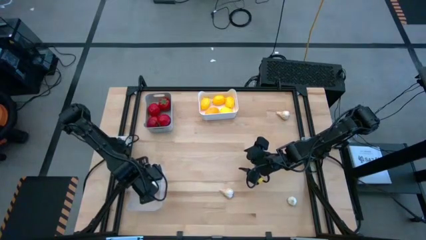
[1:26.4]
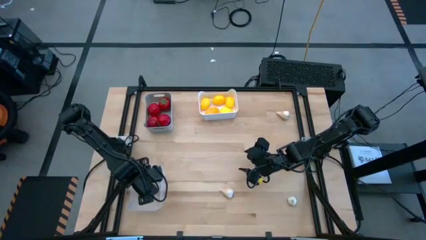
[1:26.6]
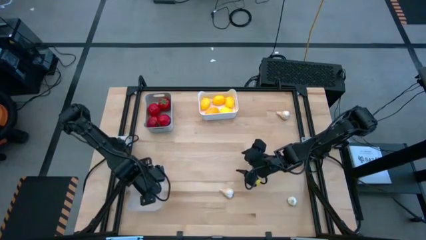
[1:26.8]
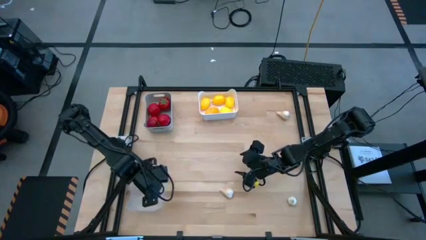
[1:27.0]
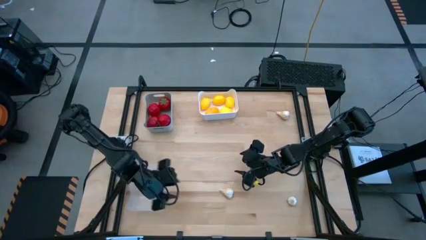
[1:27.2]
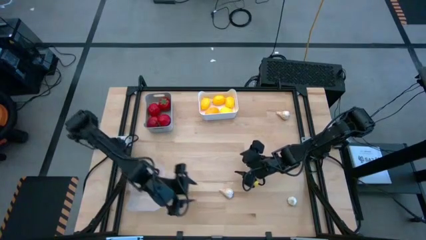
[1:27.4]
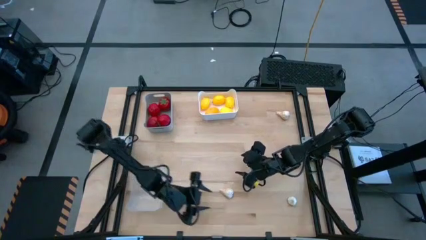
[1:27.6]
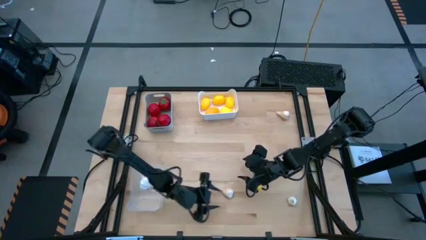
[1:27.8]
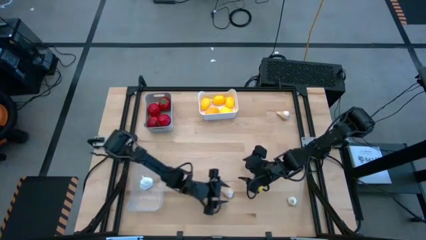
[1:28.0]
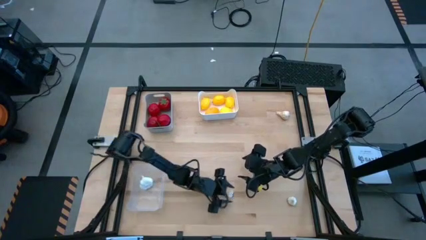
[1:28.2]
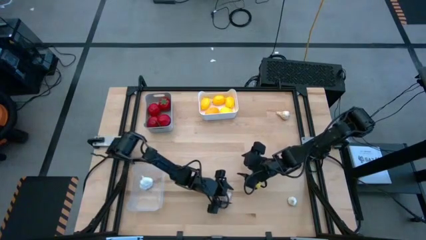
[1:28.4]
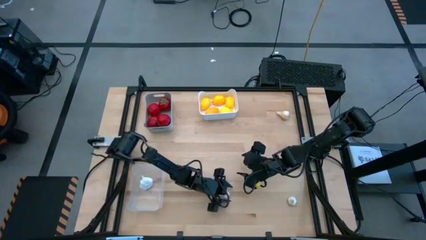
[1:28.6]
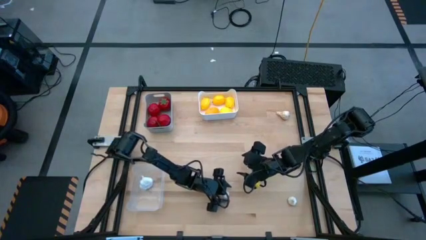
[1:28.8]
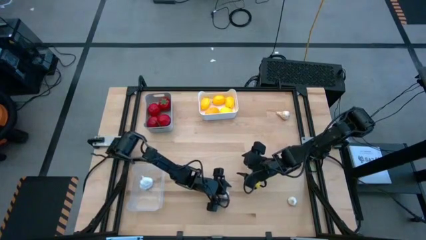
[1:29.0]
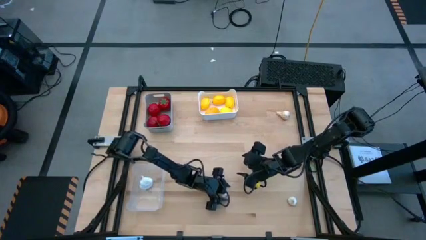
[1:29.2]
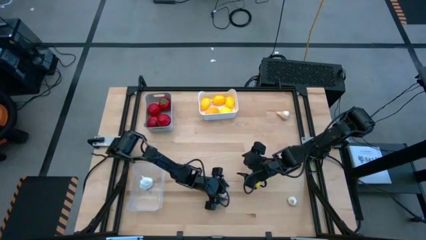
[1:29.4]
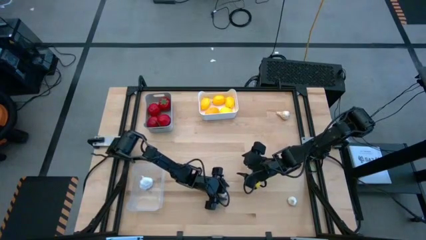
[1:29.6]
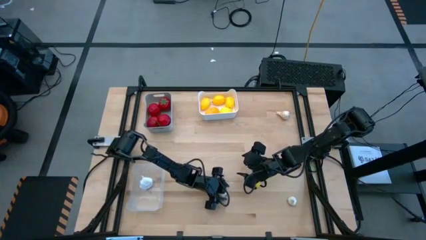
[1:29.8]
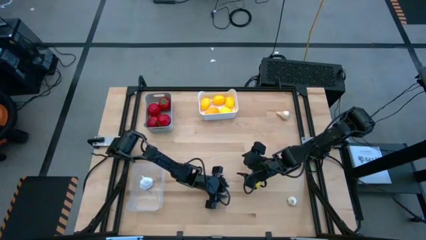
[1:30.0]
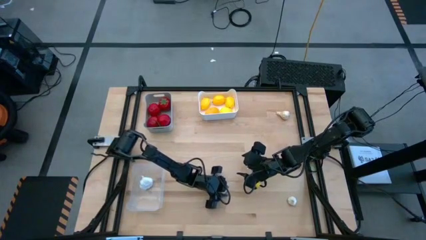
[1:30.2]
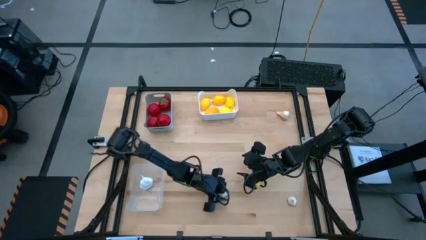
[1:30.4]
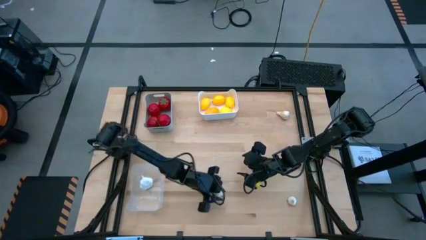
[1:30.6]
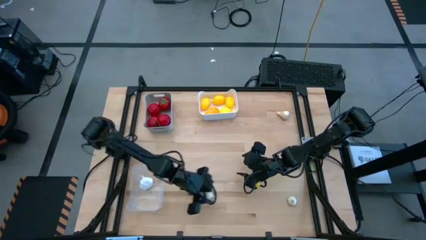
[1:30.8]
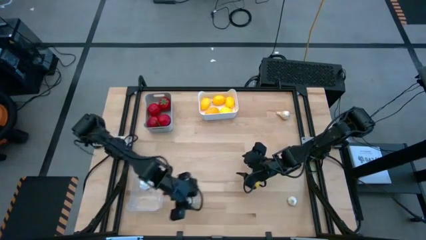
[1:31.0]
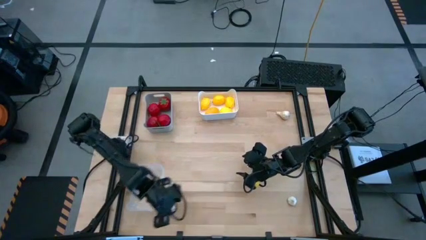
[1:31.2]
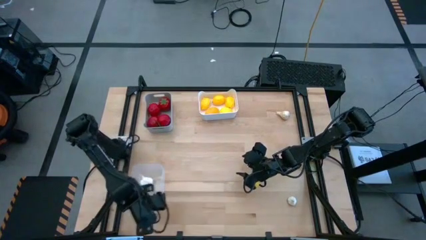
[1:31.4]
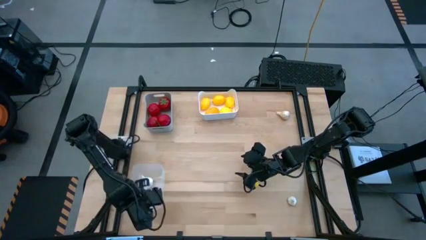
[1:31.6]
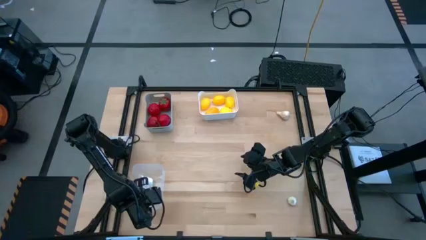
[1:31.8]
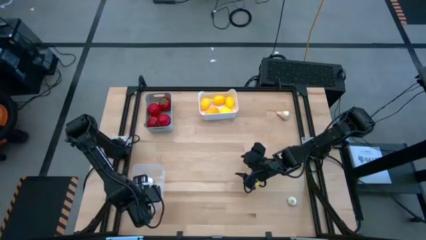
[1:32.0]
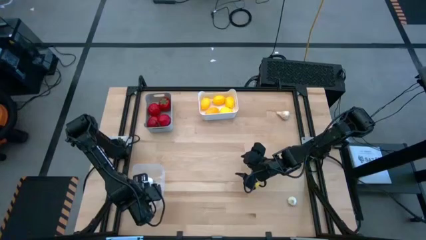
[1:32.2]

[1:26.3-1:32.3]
Task: Sort produce into baskets
Put the garlic into the transparent bin

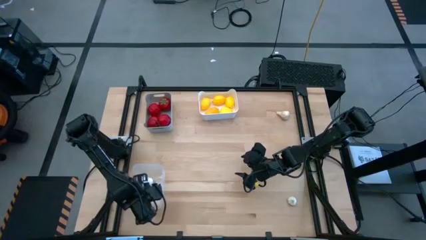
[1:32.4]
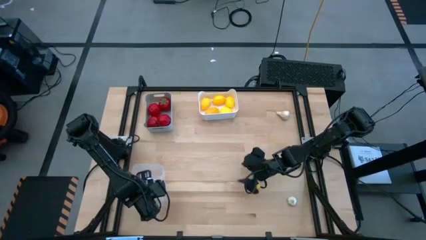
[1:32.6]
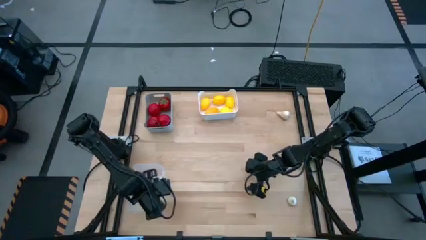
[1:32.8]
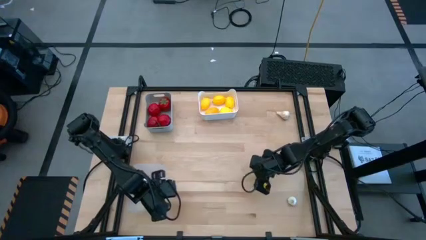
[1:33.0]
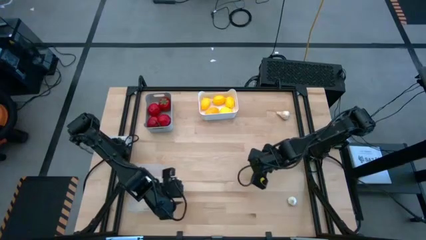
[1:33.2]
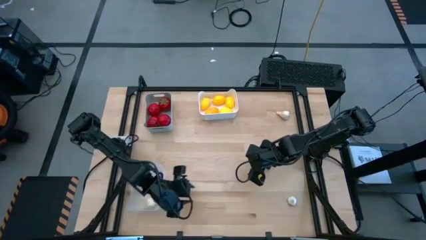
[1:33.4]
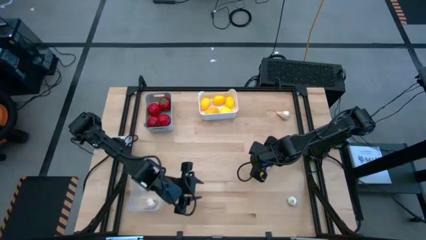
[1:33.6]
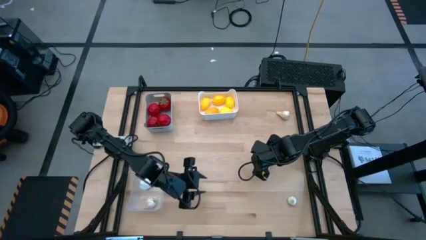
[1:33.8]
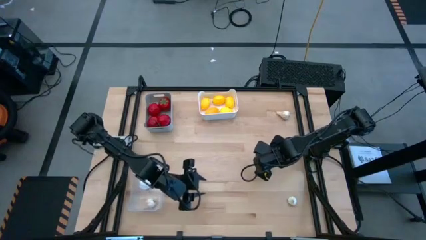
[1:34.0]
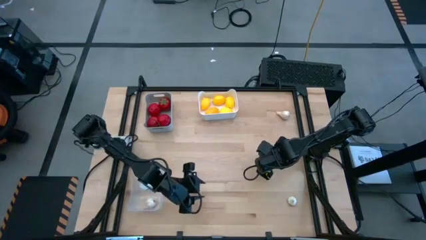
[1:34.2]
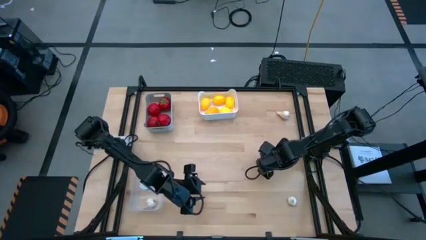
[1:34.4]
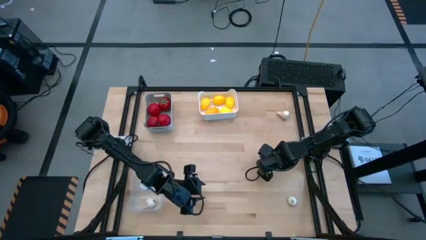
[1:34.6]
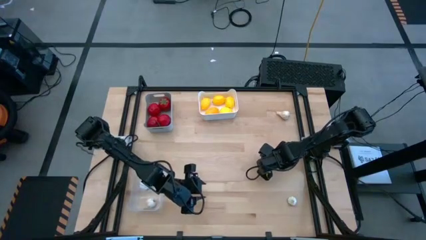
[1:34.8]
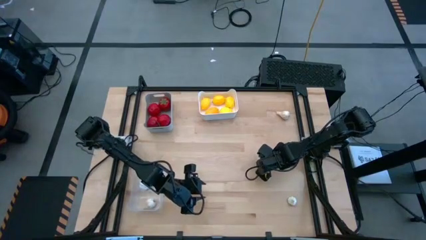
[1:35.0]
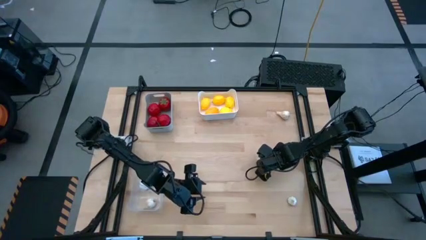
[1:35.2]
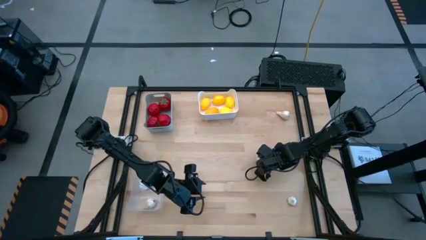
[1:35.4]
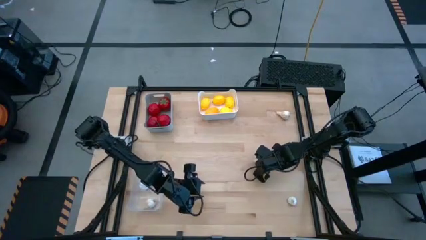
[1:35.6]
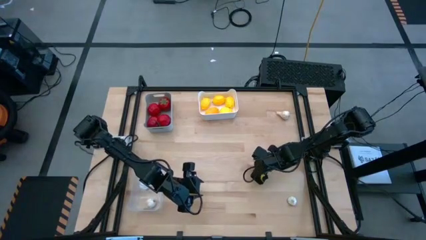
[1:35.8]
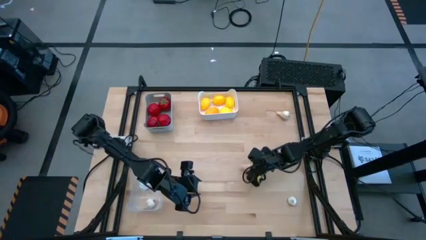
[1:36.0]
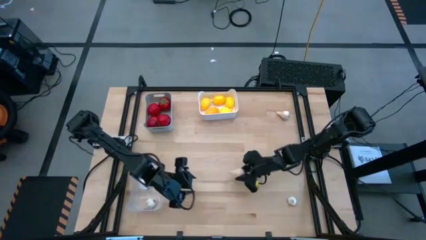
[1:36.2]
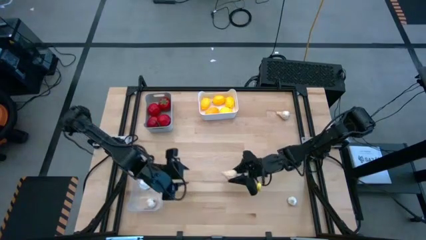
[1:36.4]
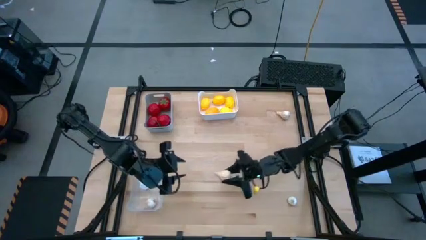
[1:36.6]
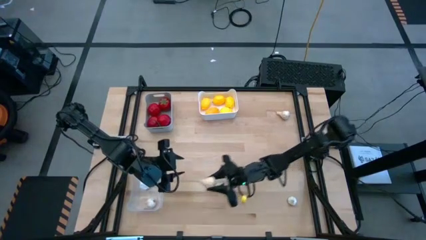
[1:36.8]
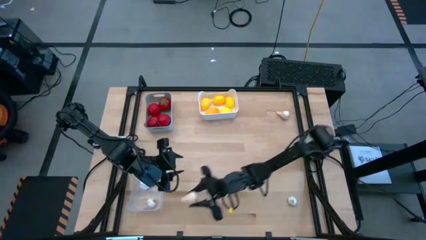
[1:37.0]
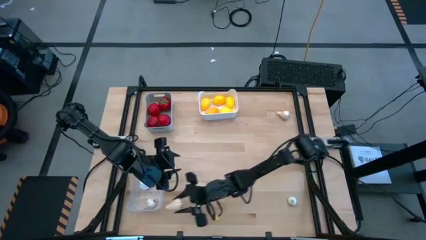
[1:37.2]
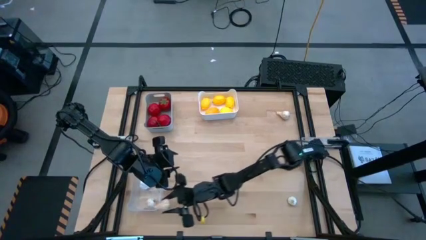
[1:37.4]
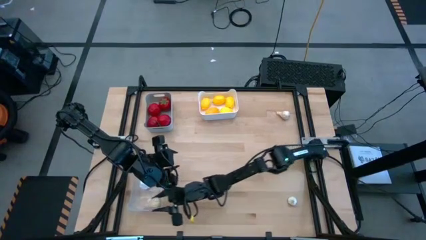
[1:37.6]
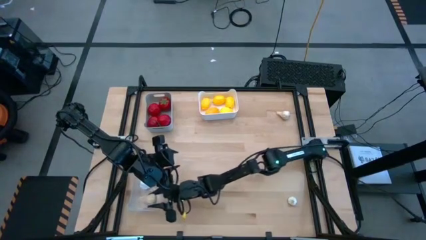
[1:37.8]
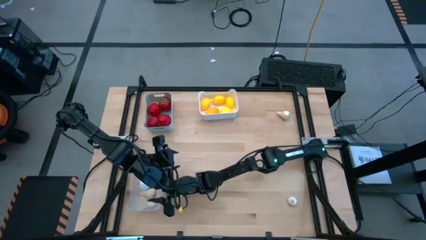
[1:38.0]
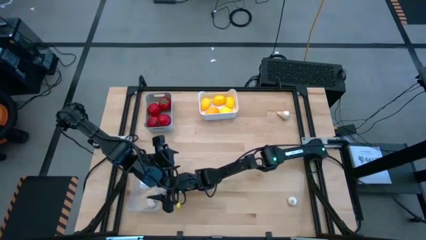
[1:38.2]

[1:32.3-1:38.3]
Put the garlic into the transparent bin

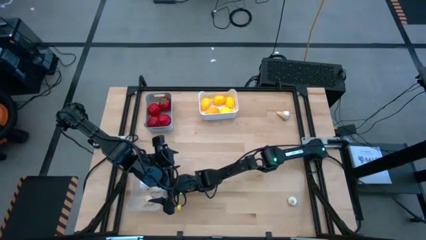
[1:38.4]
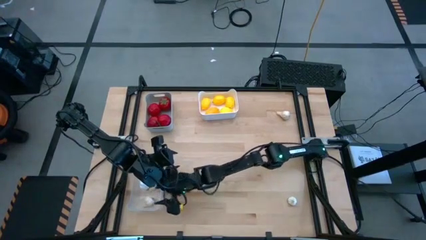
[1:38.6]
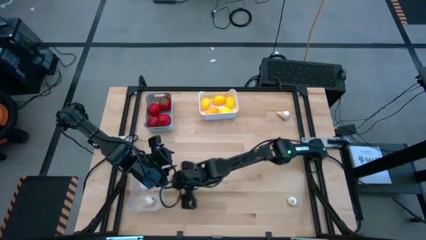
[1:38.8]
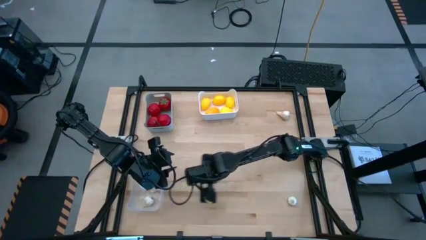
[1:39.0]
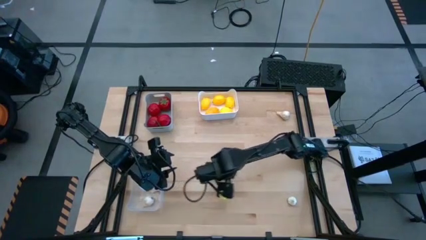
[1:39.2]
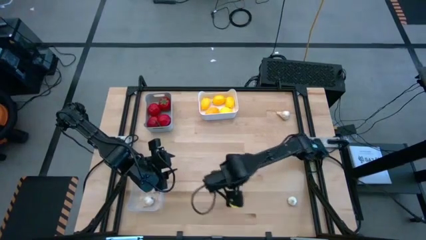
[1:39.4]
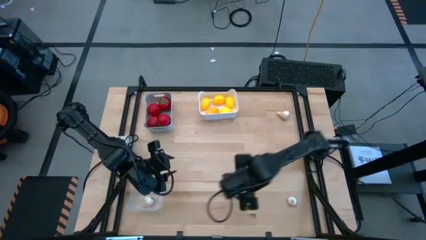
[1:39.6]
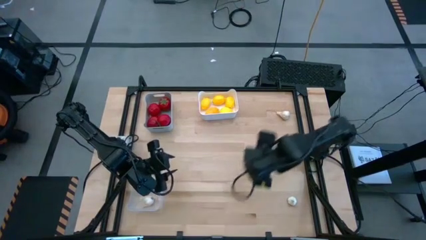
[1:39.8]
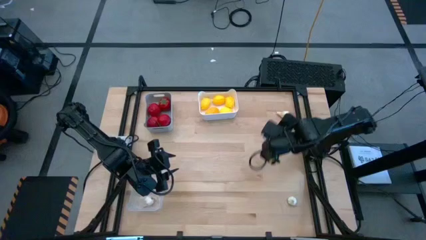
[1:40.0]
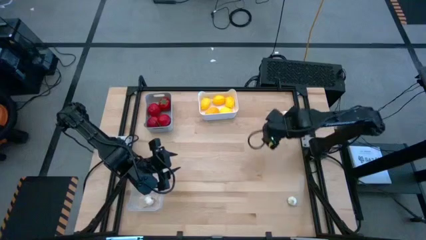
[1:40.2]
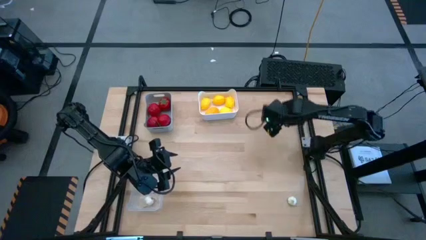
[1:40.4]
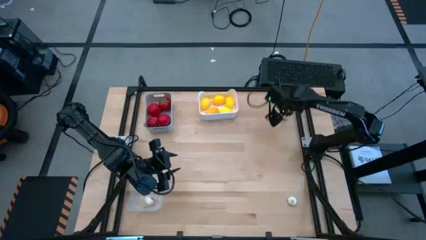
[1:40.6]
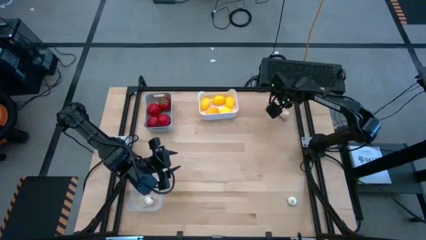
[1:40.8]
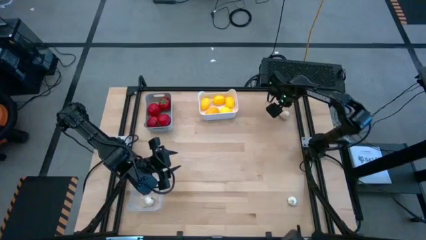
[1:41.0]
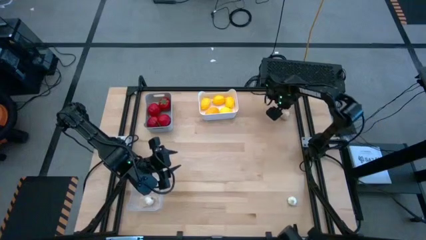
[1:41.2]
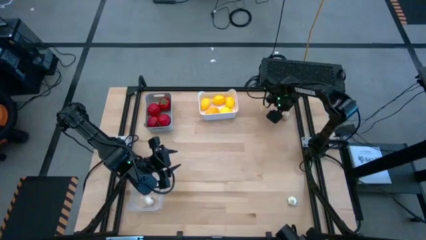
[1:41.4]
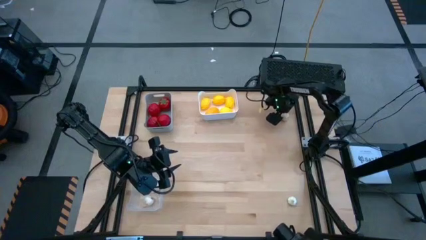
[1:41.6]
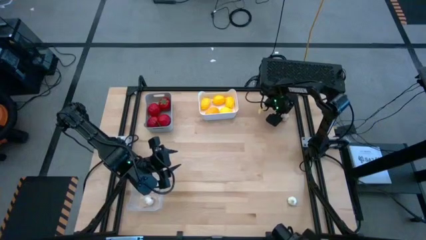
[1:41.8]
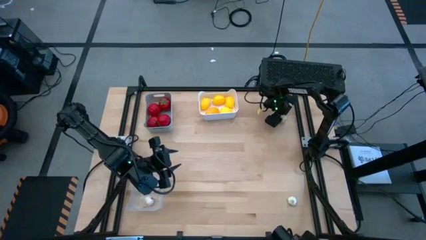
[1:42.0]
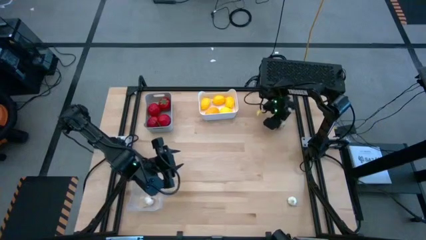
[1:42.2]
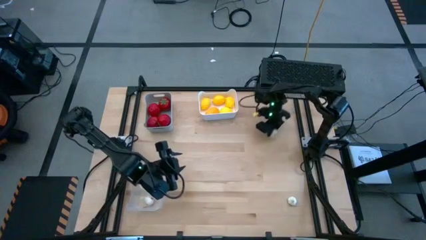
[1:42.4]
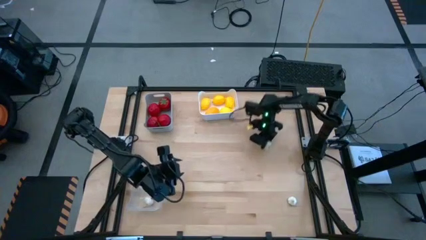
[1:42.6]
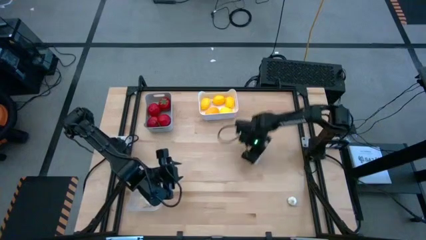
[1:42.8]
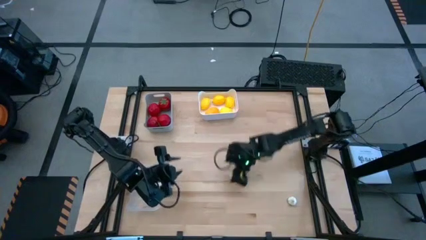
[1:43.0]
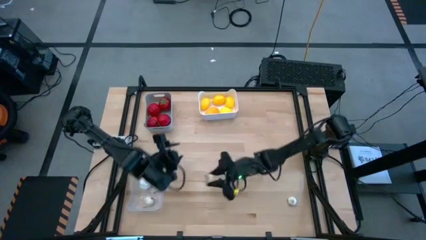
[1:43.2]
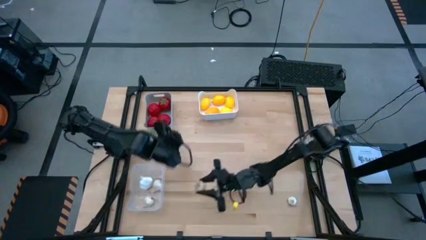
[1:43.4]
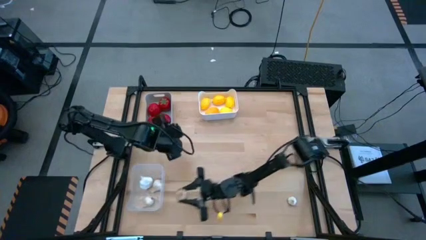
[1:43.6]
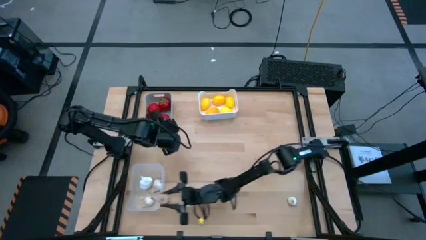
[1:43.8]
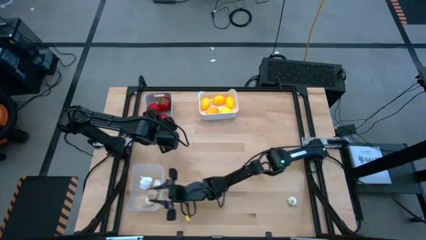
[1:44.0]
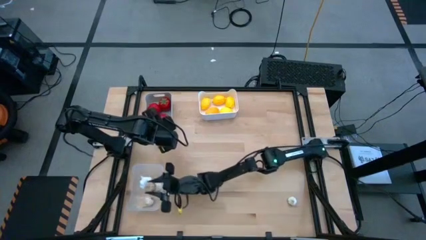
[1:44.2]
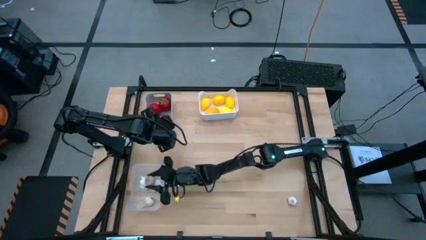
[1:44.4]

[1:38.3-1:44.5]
Put the garlic into the transparent bin
